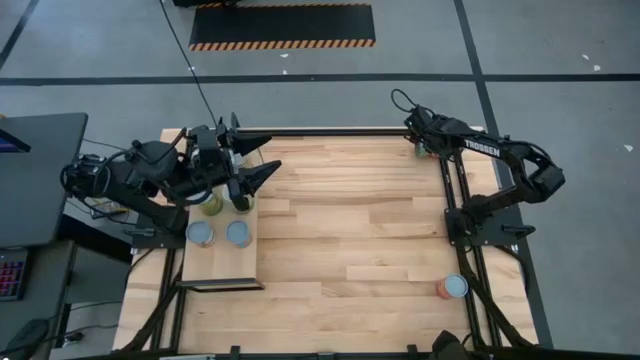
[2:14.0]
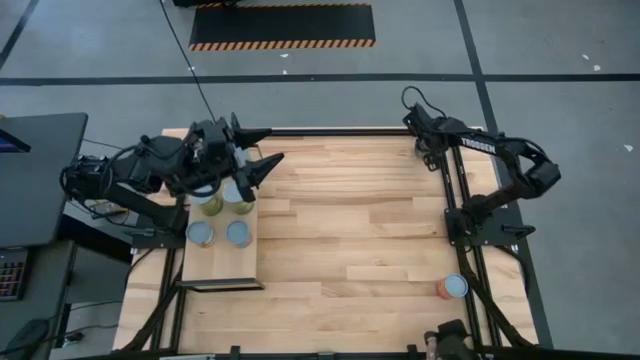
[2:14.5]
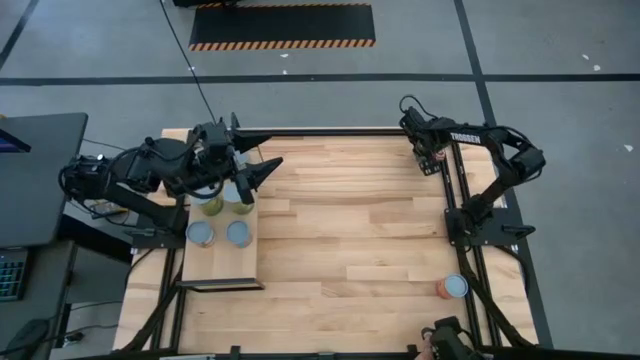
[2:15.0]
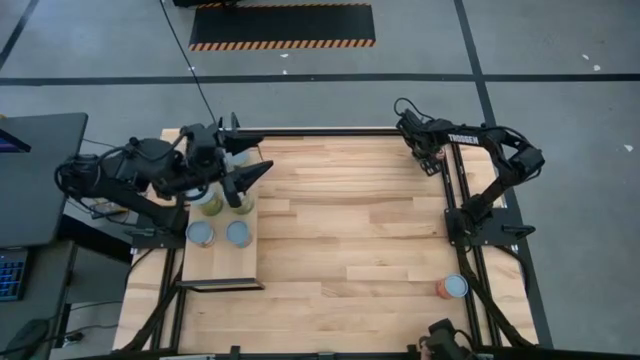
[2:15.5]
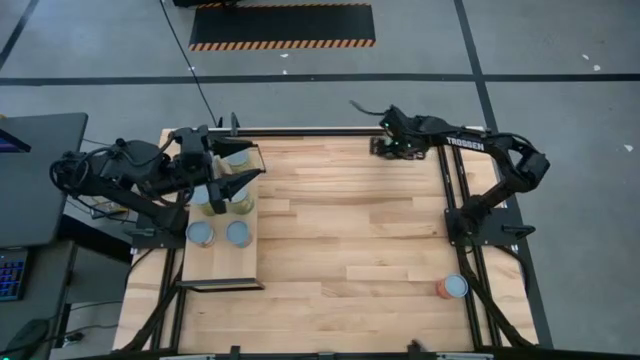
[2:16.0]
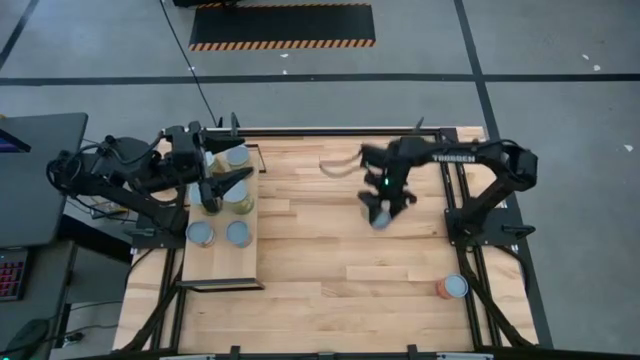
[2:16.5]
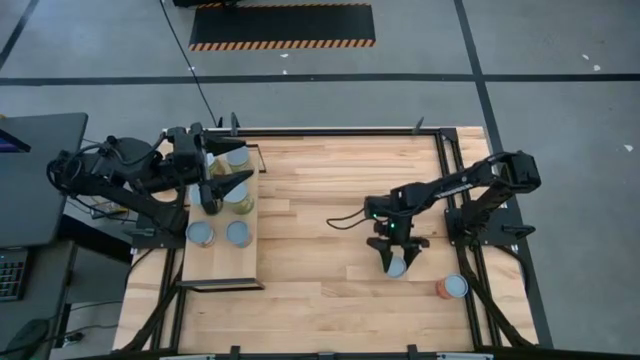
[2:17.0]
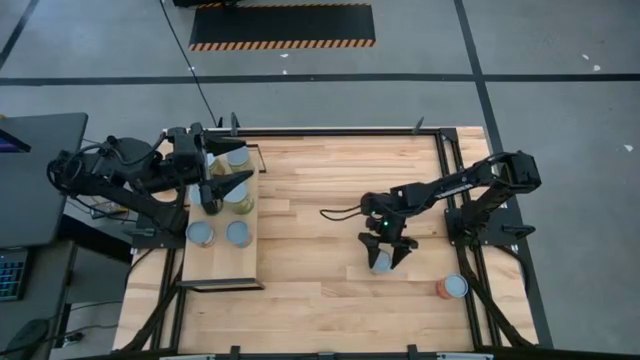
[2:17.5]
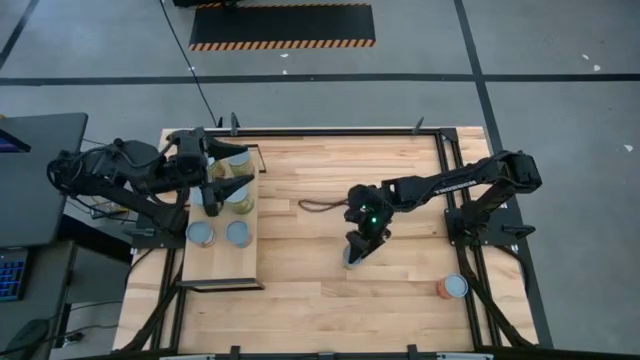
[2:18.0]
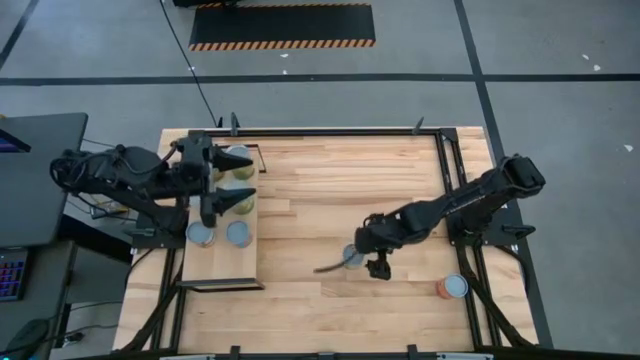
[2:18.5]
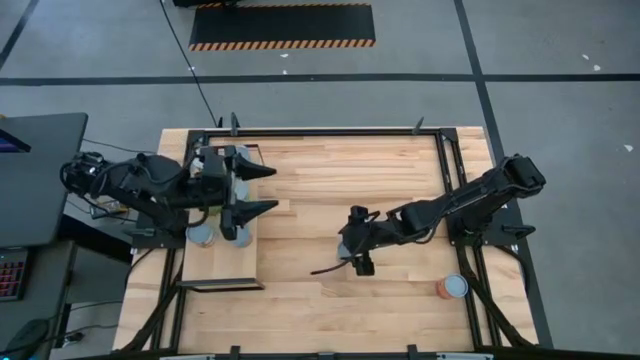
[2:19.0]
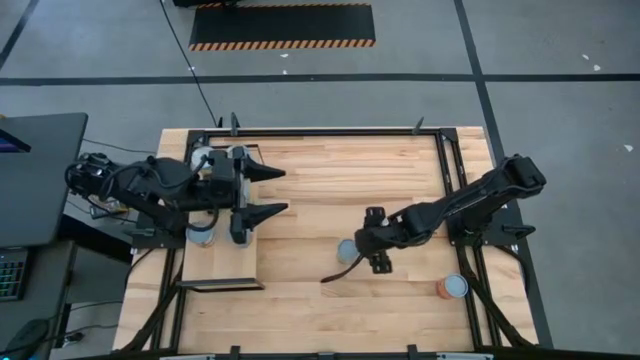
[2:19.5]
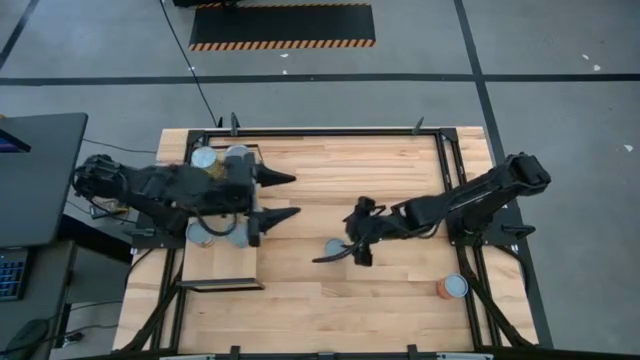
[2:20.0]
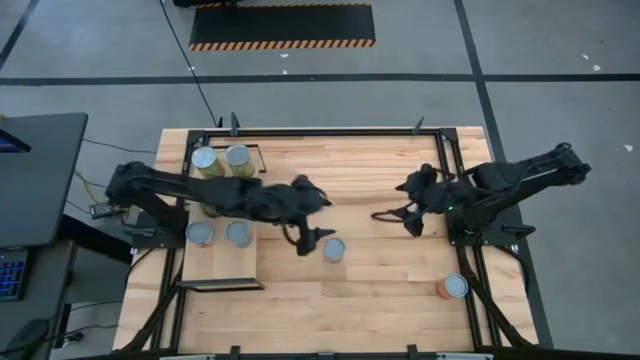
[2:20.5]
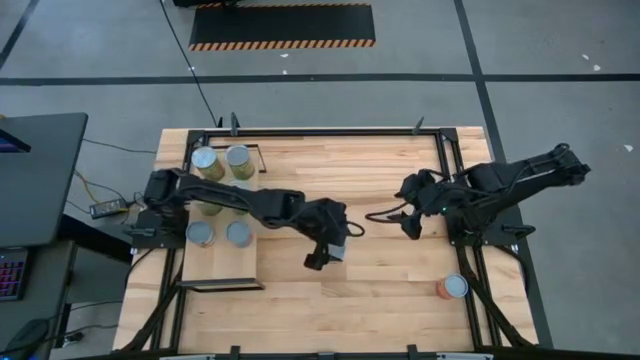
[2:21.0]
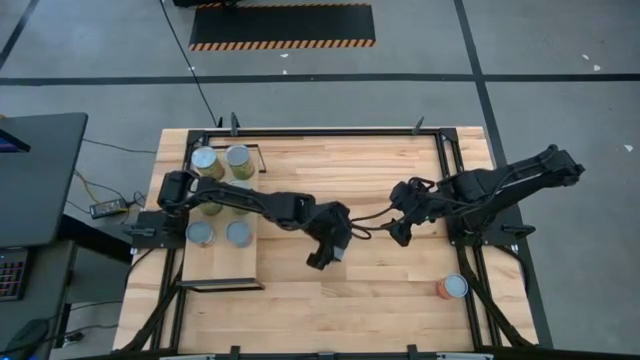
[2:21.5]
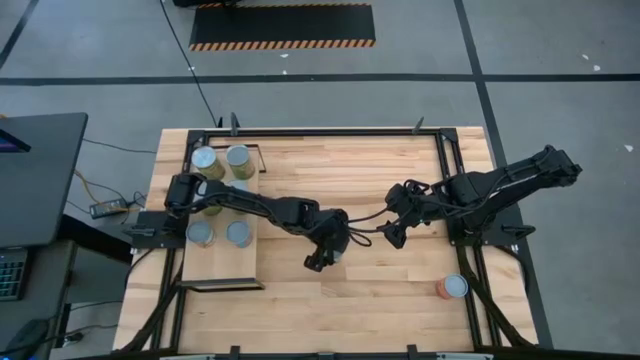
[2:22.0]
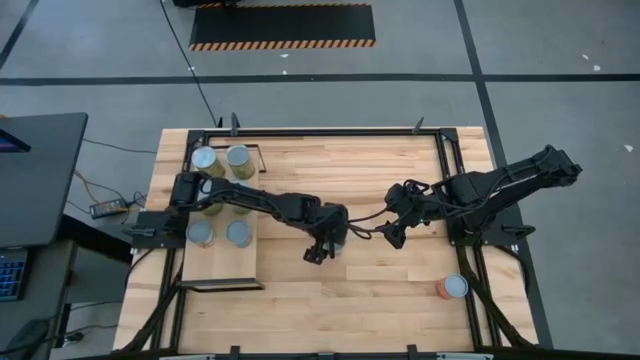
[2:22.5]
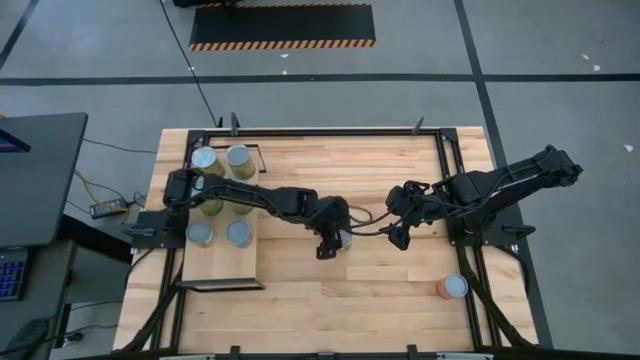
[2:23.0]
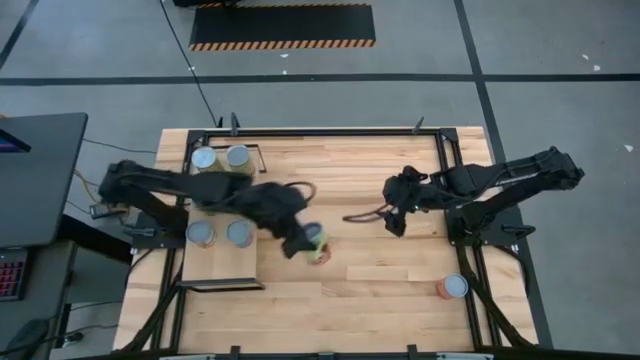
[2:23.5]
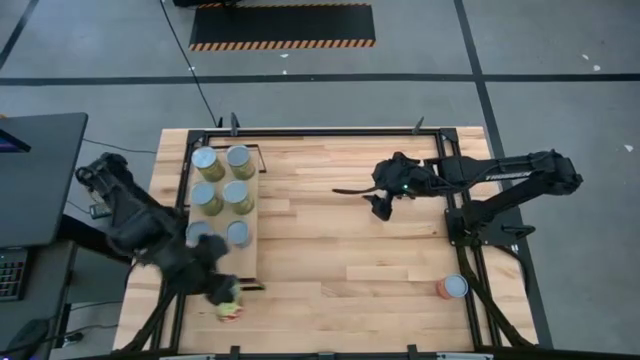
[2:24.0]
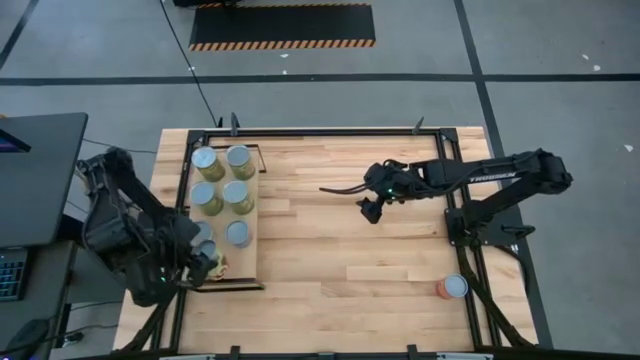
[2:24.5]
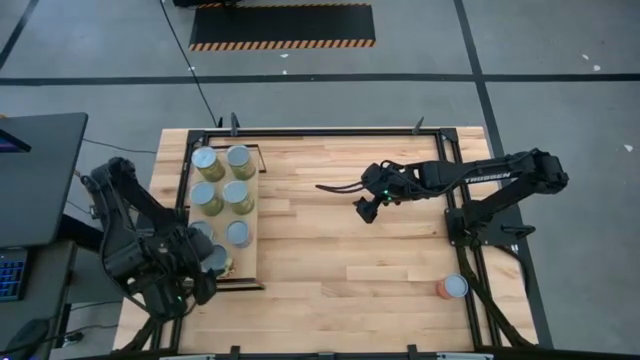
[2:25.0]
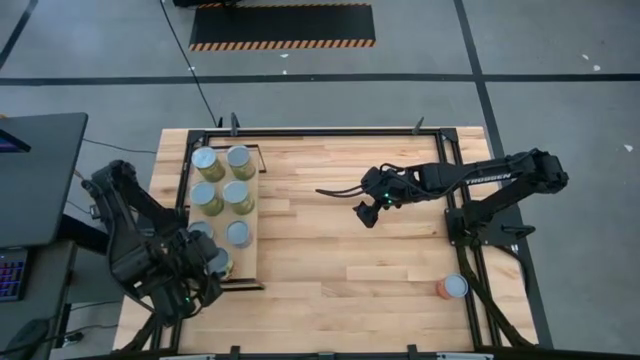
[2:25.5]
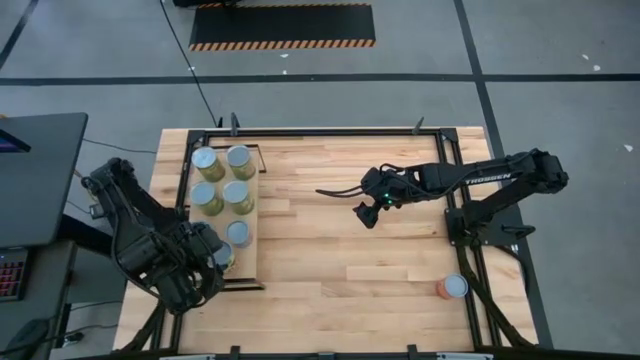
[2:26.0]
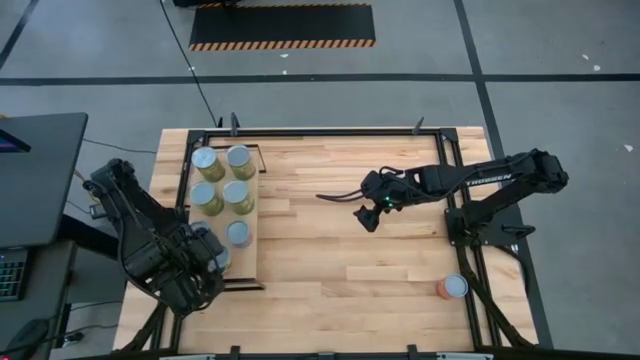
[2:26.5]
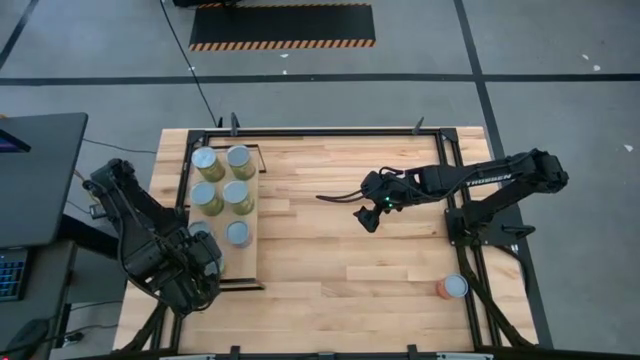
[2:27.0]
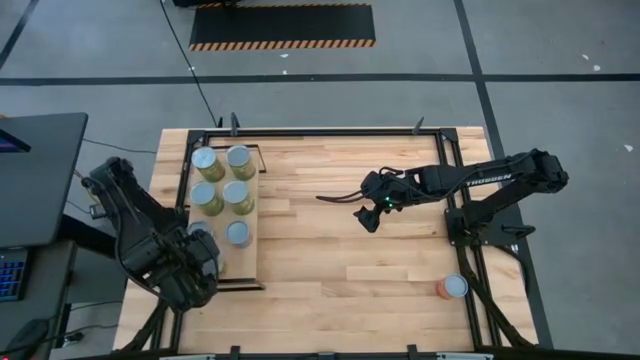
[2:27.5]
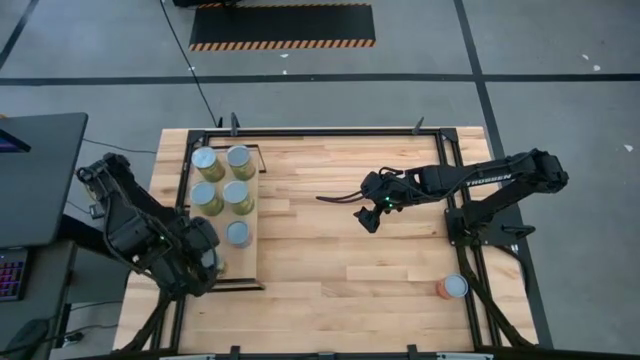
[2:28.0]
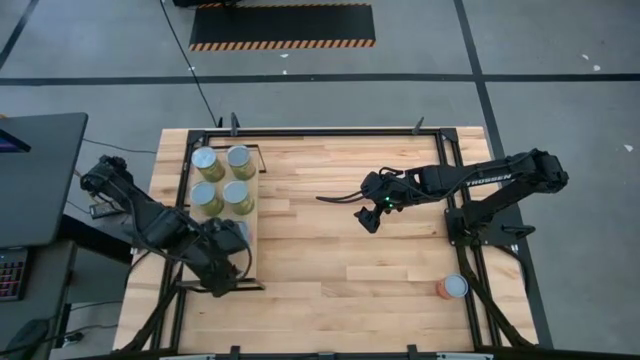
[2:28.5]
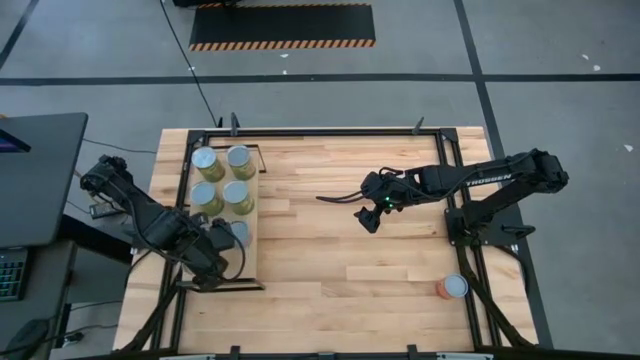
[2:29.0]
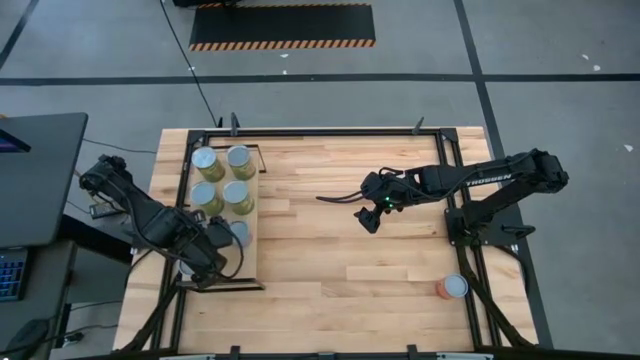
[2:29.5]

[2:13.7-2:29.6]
Task: Pick and place cans onto a shelf
Put the canned spaghetti sauce on the shelf

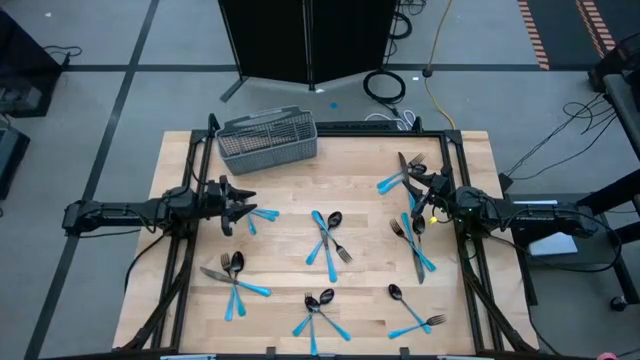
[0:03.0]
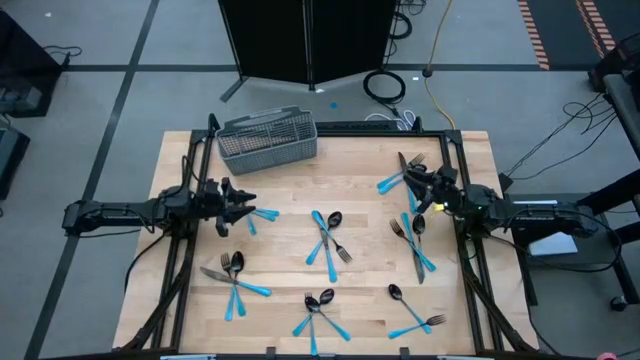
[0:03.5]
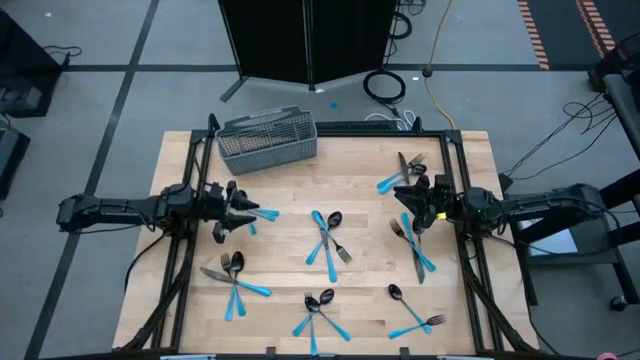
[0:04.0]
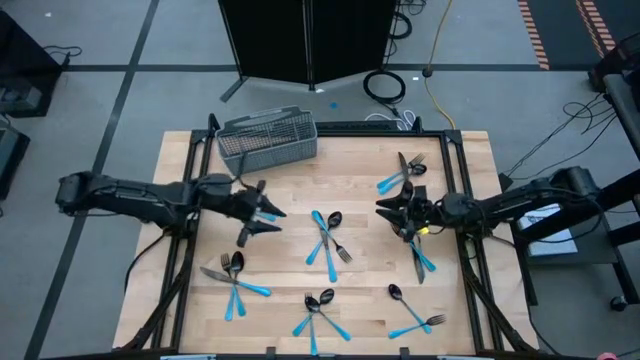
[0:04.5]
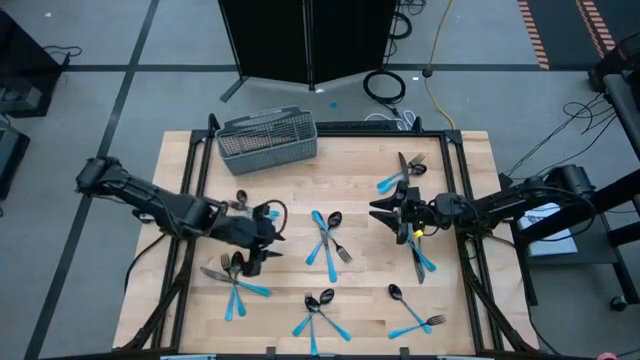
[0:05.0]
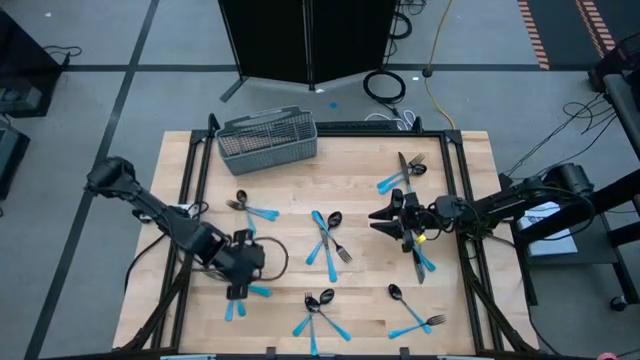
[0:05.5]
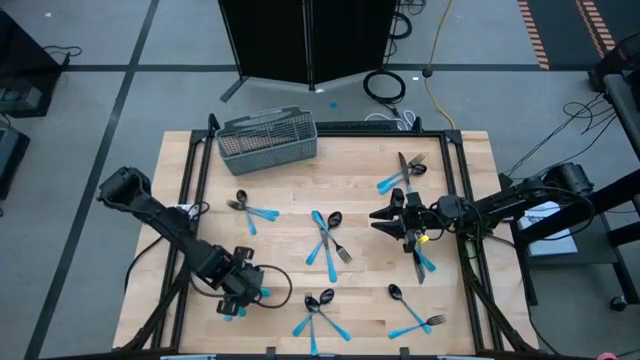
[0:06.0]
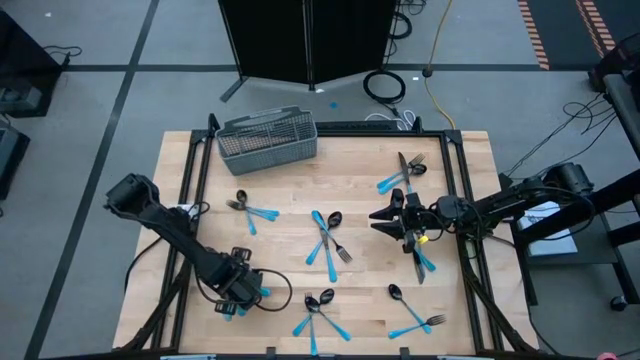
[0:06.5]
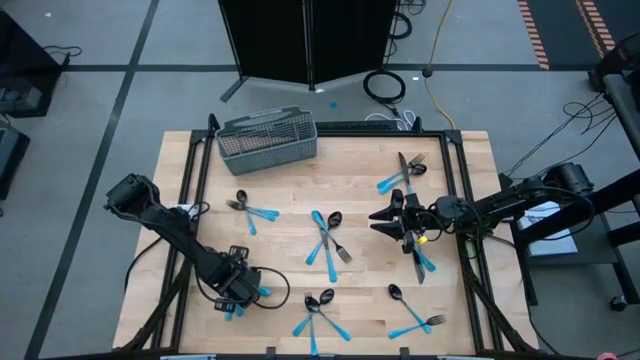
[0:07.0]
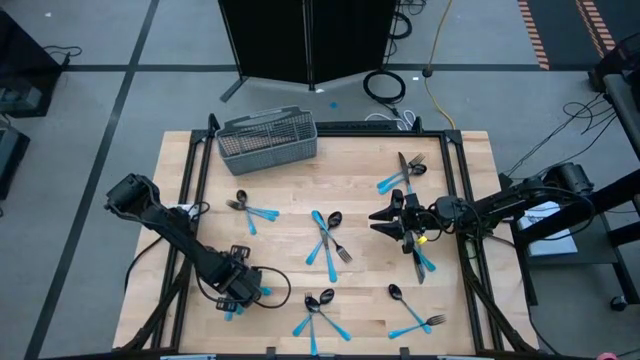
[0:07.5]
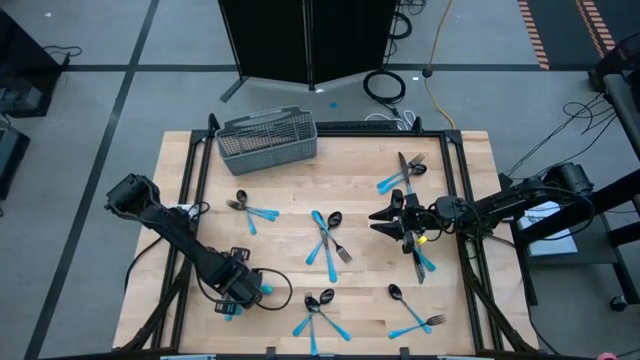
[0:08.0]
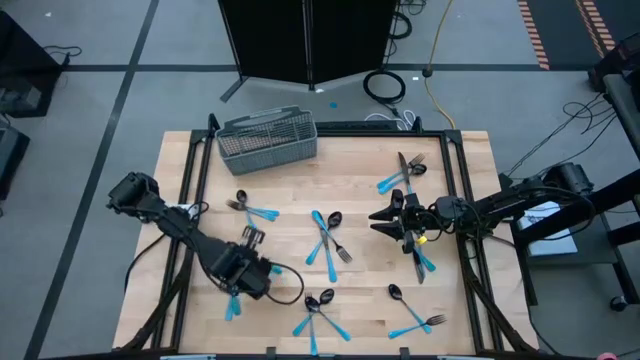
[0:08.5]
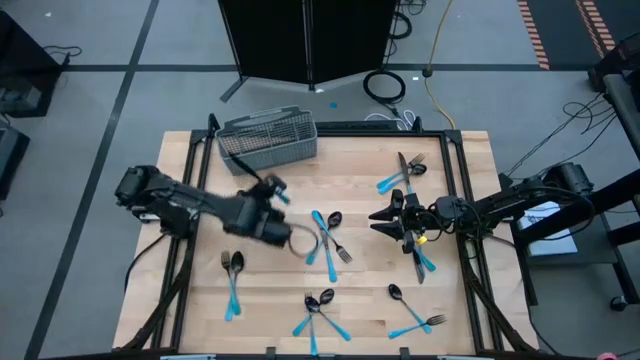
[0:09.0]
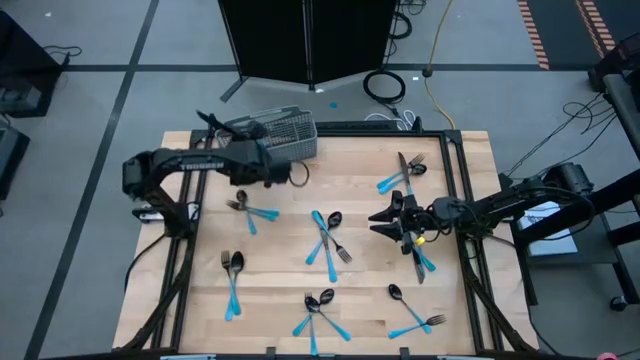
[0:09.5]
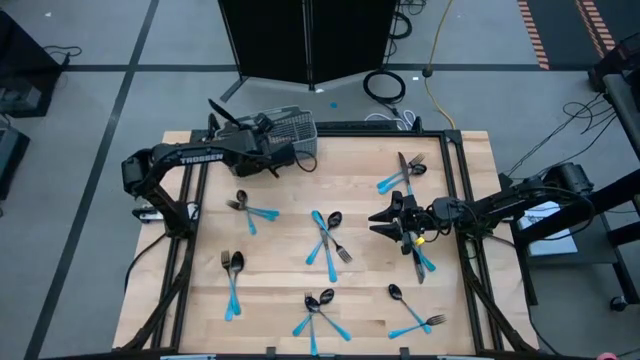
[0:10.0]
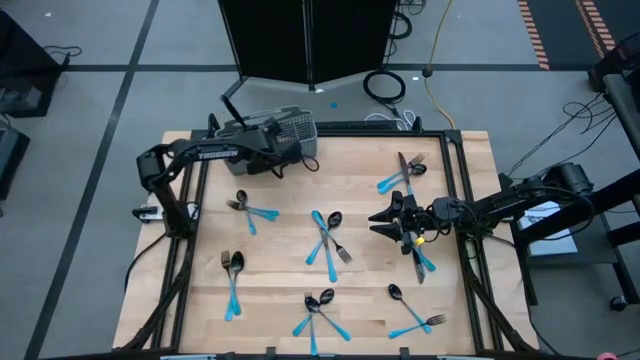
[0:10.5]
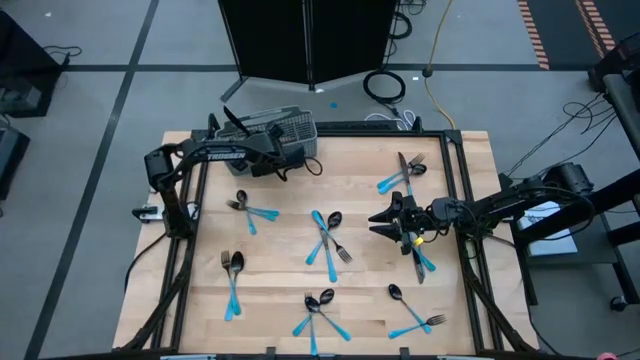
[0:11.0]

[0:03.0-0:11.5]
Task: Sort silverware
Put the blue knife into the silverware basket
